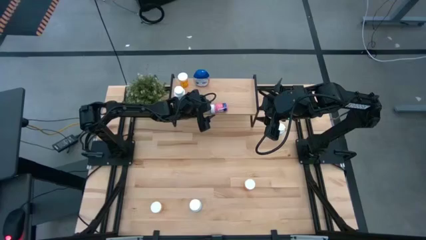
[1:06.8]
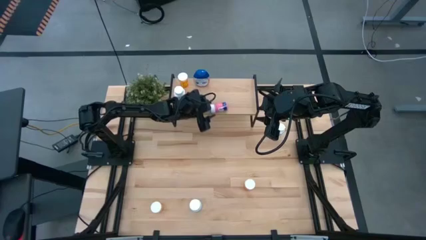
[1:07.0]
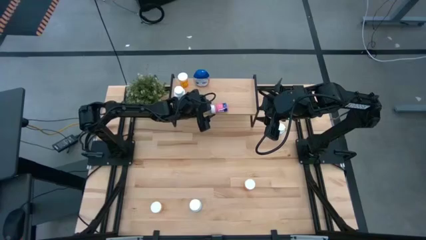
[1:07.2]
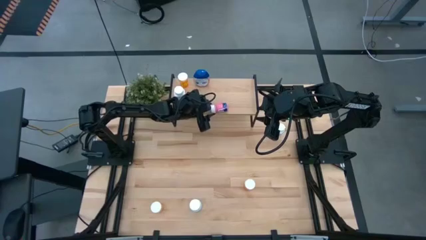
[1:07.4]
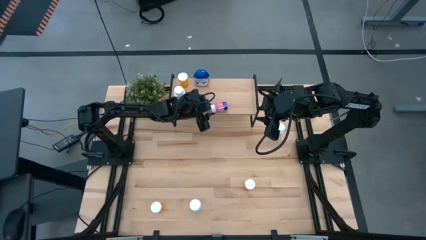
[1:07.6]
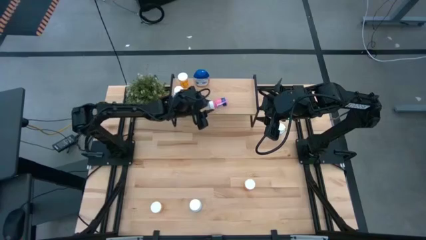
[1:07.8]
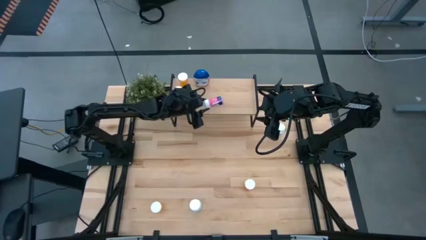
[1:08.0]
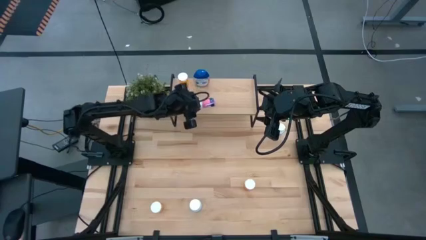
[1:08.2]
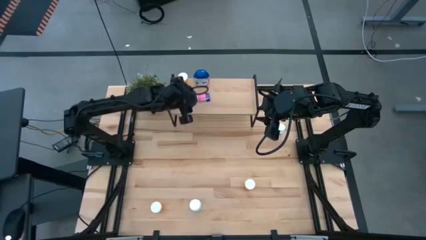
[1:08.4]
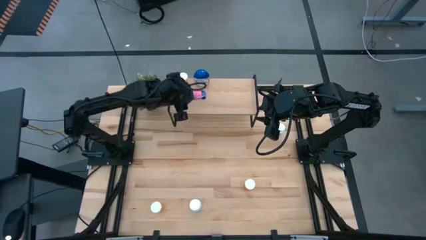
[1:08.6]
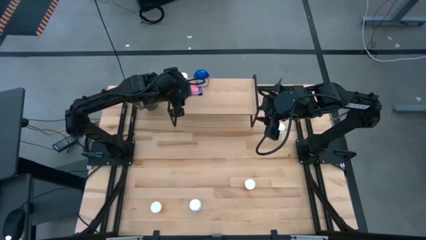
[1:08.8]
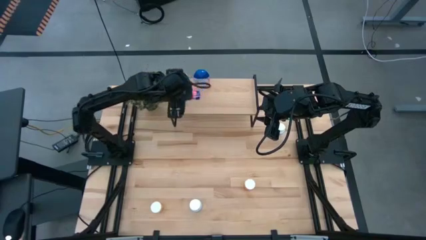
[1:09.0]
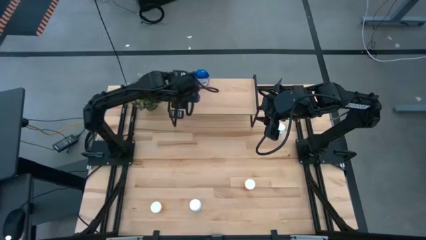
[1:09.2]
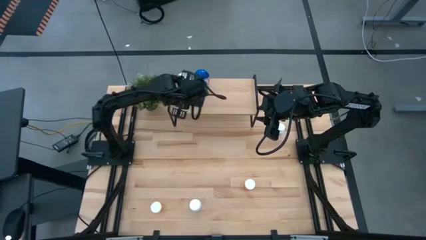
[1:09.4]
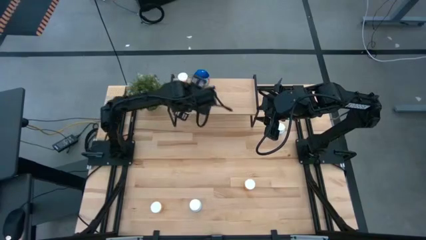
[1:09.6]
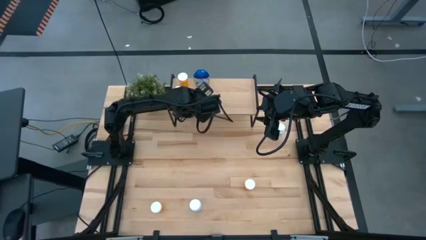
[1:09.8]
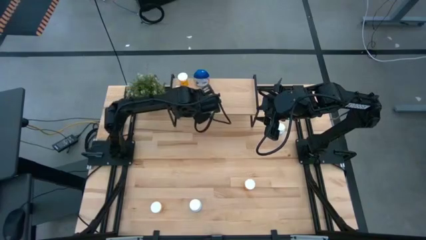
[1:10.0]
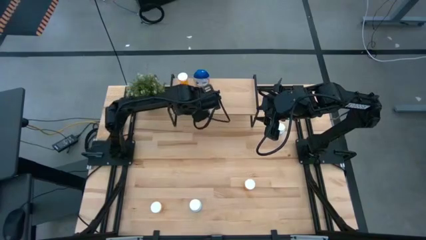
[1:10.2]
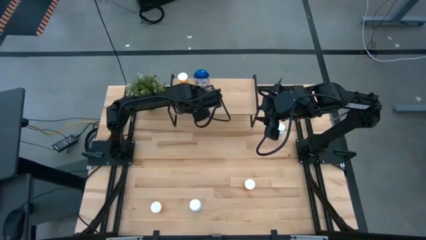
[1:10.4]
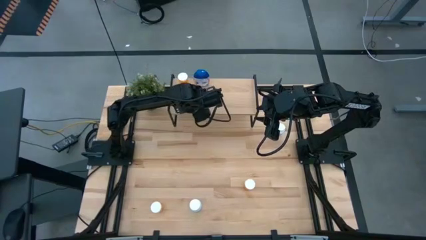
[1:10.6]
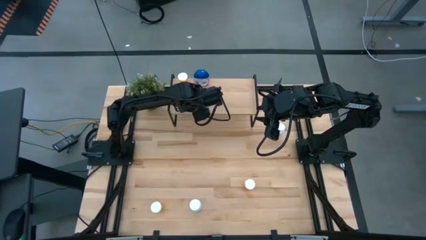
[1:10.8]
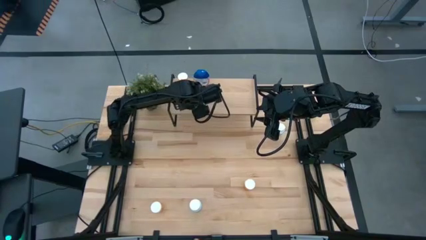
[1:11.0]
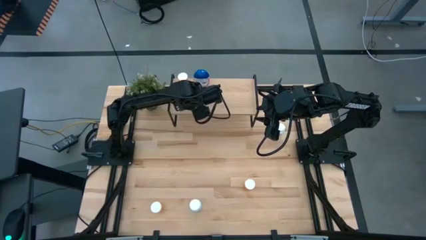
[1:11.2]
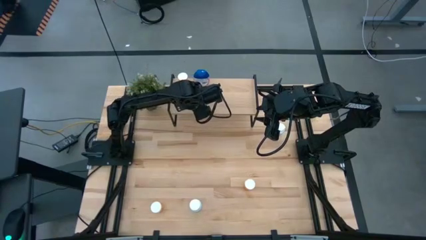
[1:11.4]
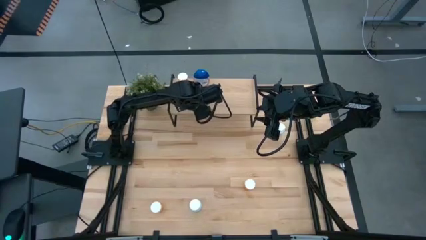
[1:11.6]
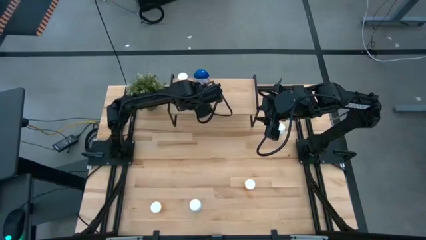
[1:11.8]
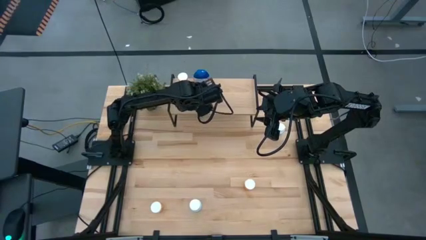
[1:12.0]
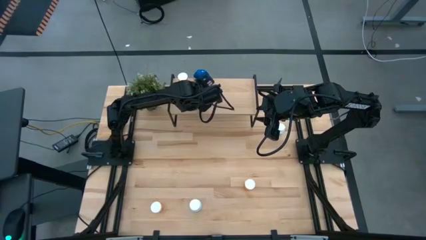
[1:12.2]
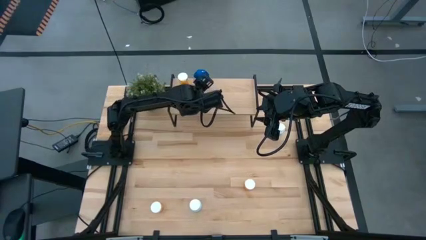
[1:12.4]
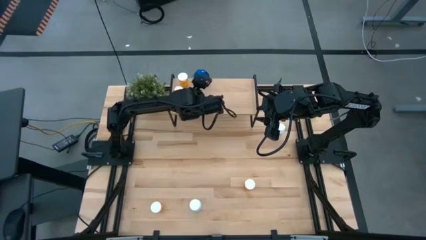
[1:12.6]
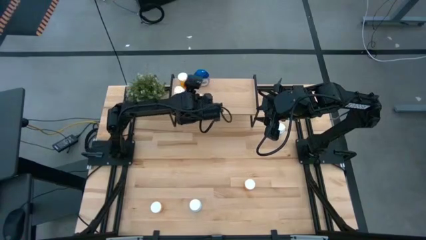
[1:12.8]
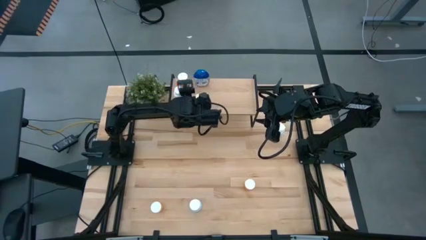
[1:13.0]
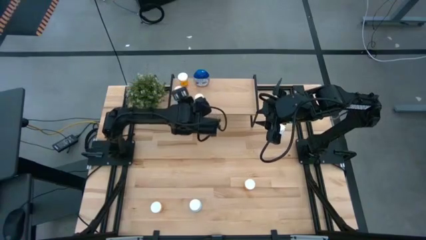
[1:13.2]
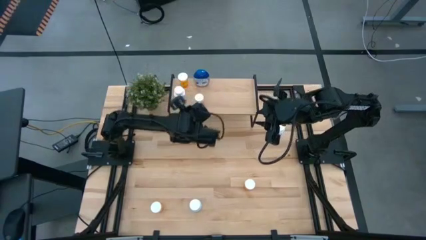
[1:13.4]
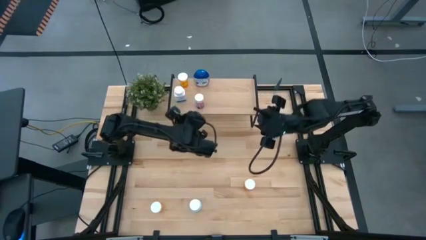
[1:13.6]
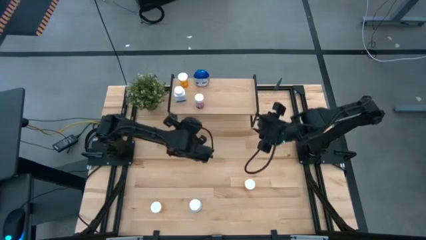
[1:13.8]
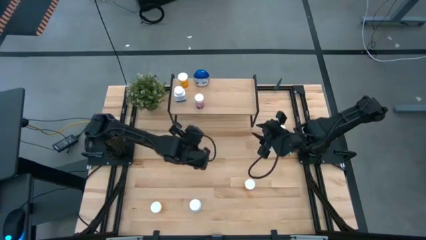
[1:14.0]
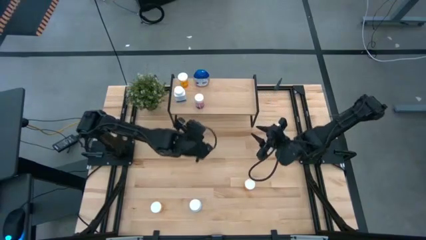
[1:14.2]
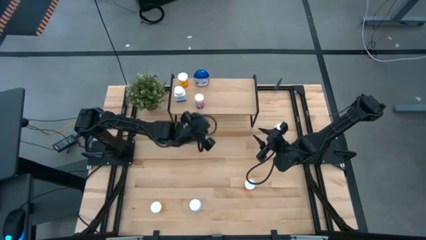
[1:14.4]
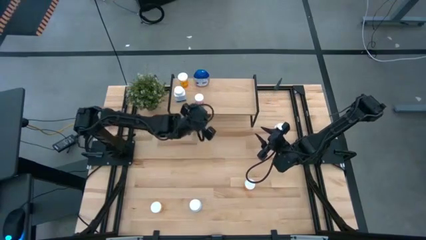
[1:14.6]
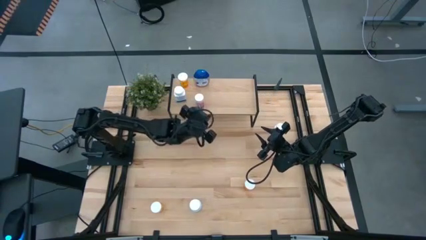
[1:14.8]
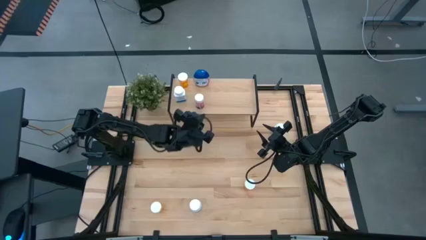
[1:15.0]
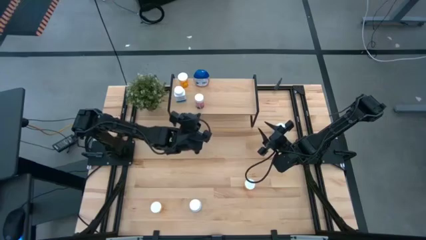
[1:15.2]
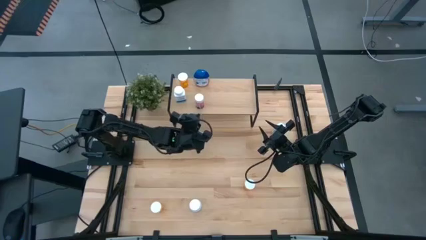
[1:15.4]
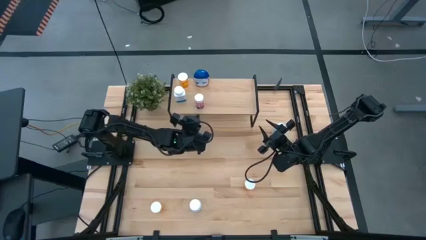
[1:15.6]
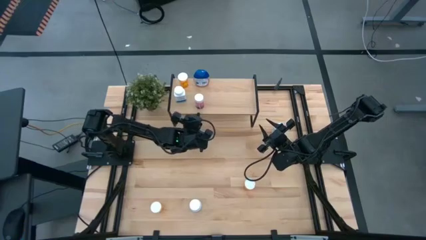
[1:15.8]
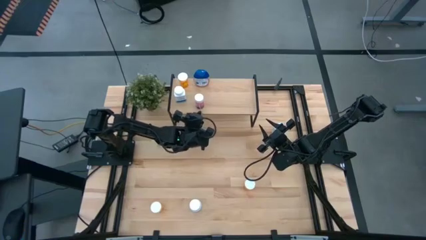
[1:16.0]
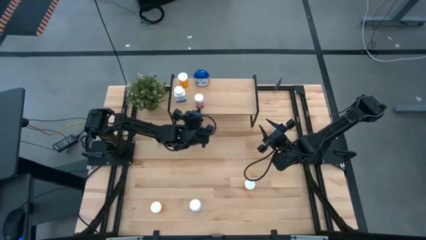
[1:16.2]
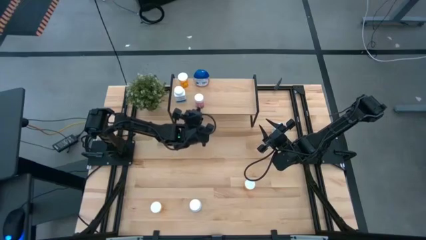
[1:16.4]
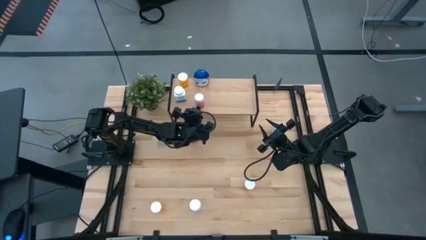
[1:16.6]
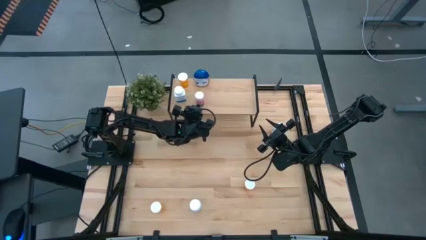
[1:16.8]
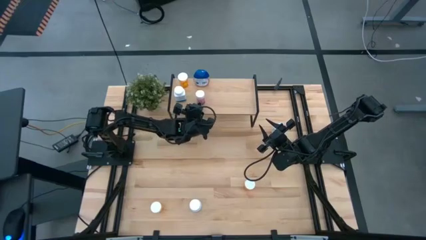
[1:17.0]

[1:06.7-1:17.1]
Task: Pick and place medicine bottles onto shelf by color
Put the pink bottle on the shelf

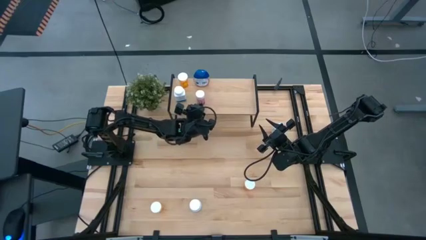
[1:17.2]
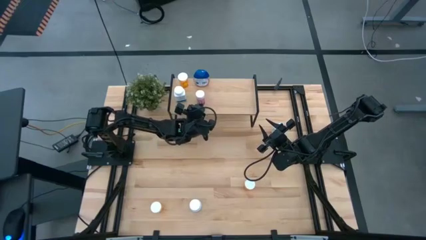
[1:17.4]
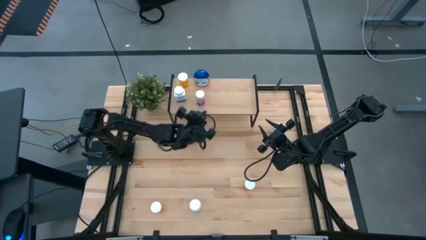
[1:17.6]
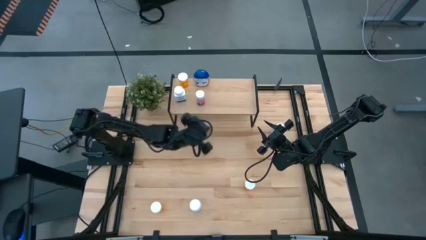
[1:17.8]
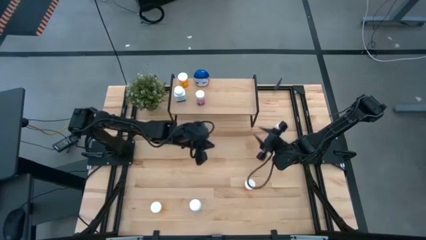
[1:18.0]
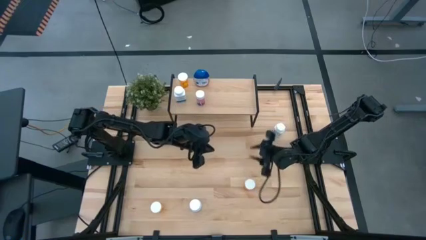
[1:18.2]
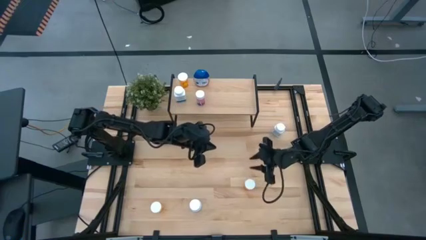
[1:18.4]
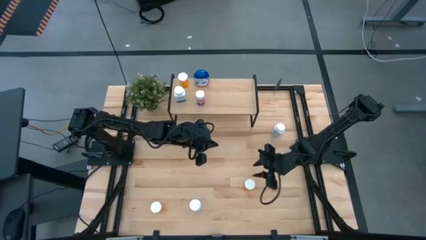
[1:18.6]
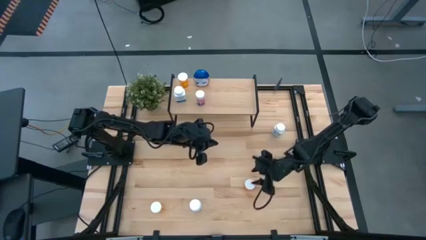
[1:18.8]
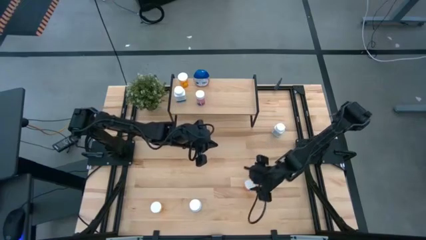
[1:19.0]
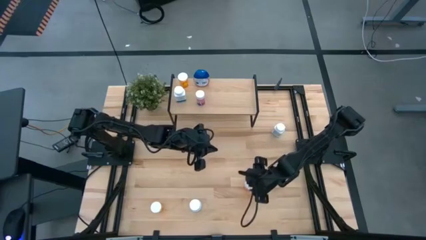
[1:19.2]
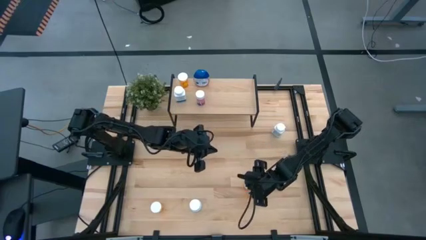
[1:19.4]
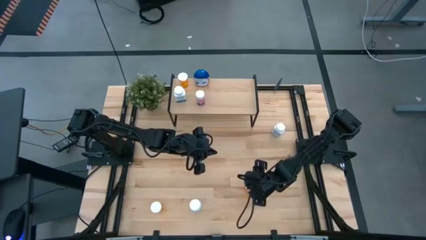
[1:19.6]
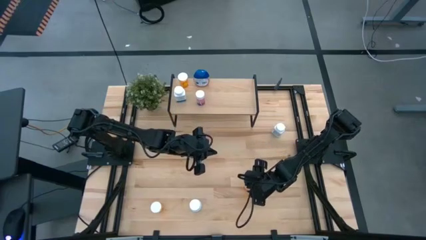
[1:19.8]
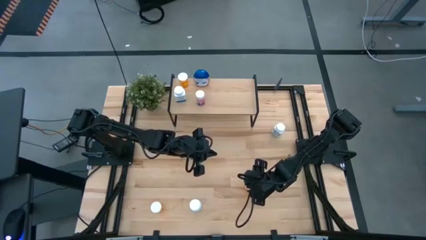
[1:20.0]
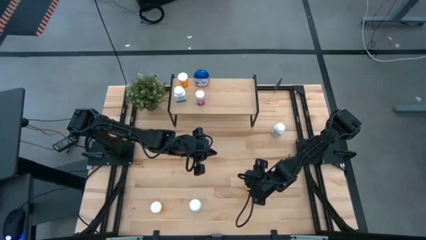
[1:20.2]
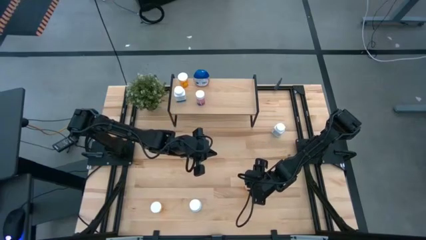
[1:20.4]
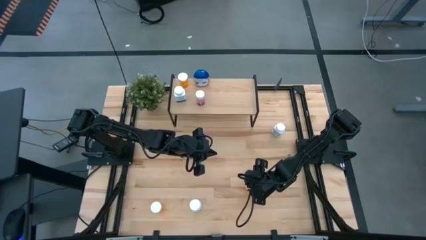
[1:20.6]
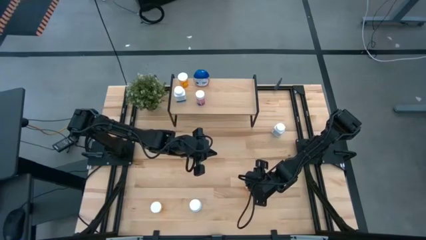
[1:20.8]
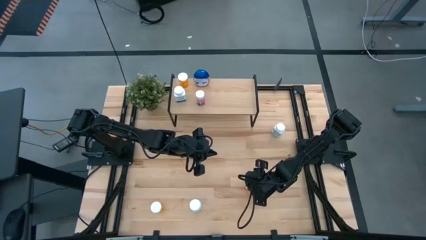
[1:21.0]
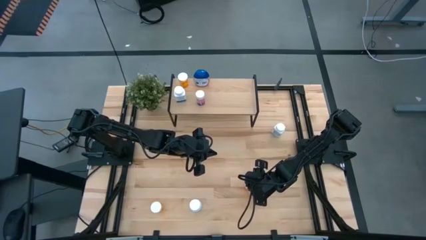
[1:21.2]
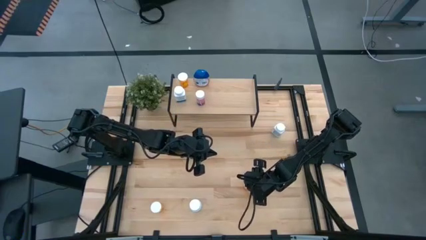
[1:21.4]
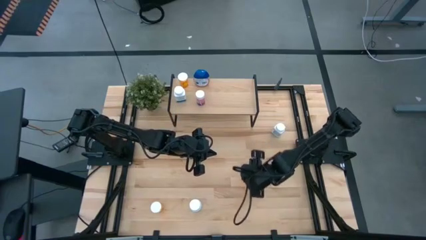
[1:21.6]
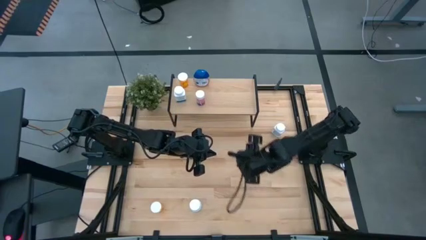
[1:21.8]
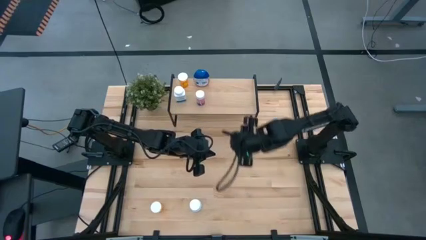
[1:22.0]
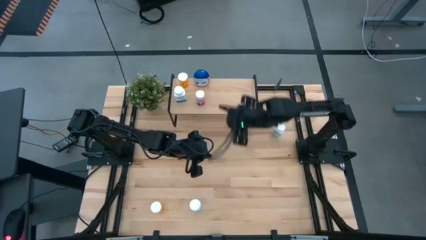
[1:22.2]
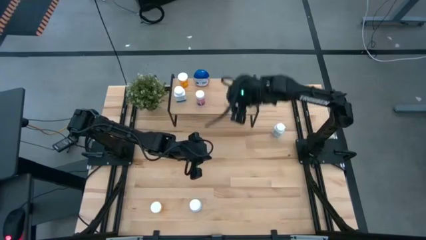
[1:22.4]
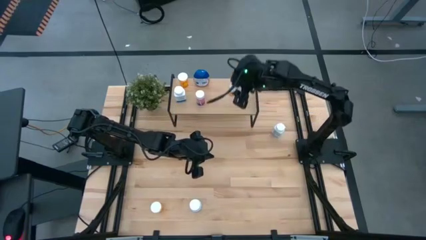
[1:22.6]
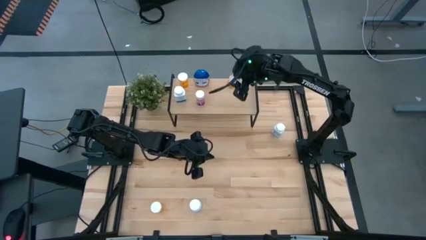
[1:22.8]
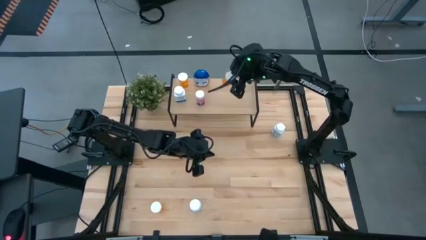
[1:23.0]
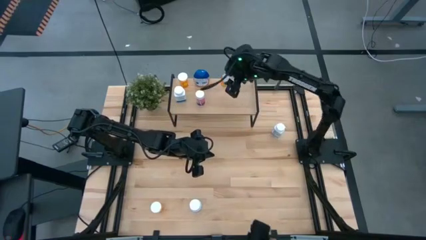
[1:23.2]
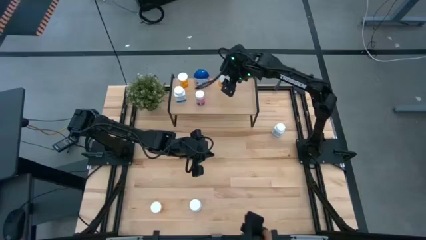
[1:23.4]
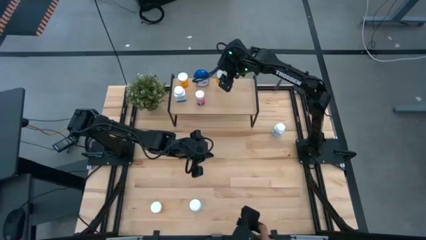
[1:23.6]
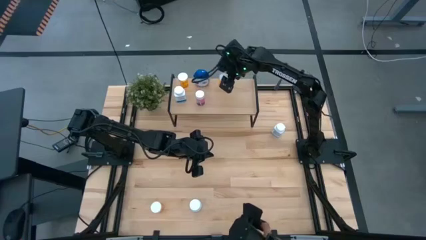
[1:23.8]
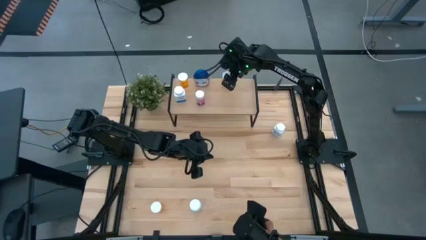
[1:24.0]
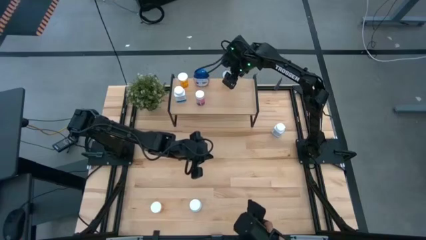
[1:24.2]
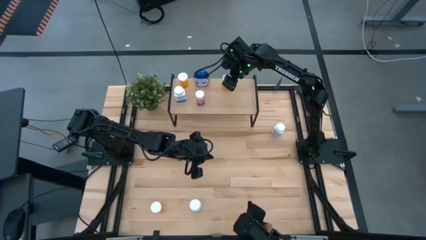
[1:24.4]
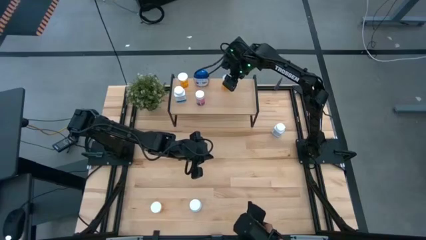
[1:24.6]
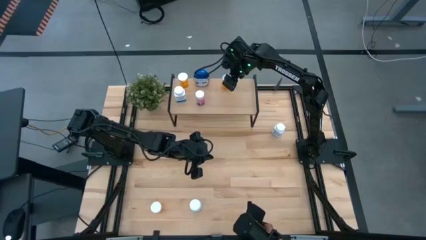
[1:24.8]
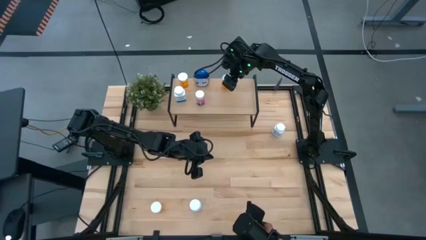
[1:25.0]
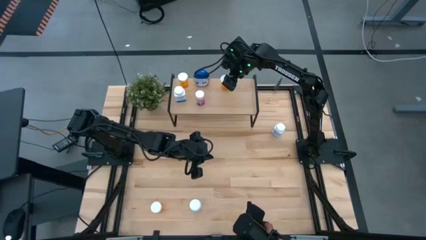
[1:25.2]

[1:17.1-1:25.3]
Put the right orange pill bottle on the shelf
